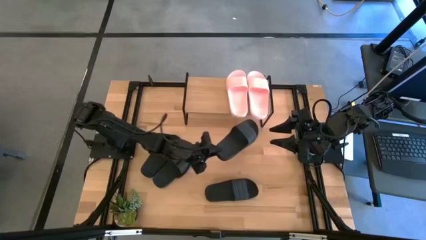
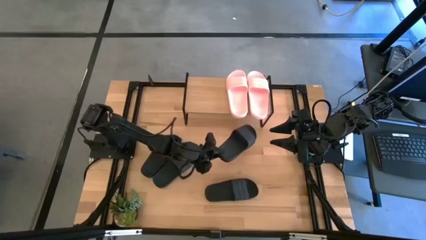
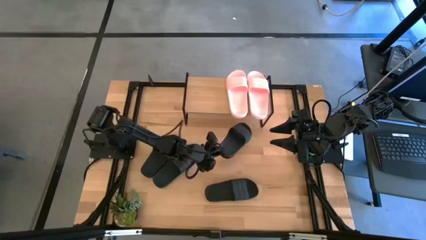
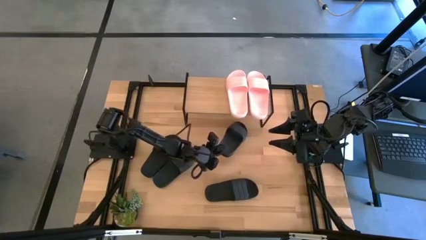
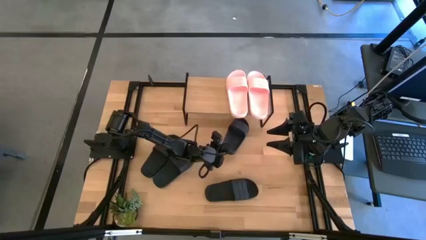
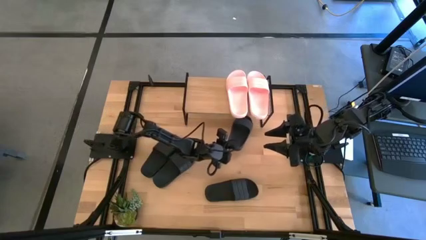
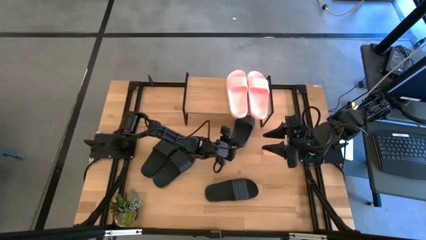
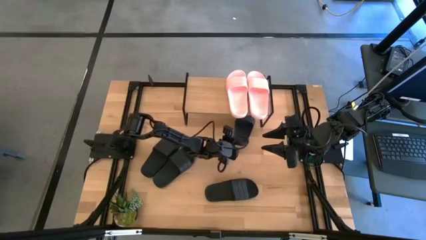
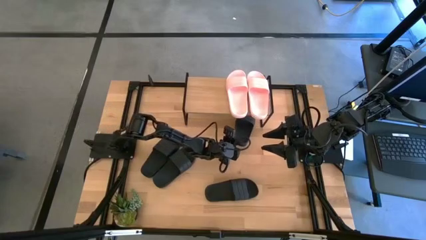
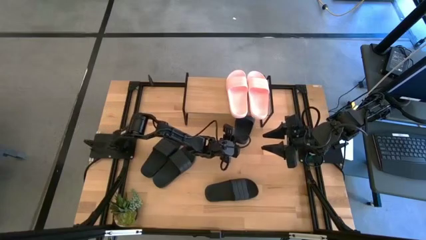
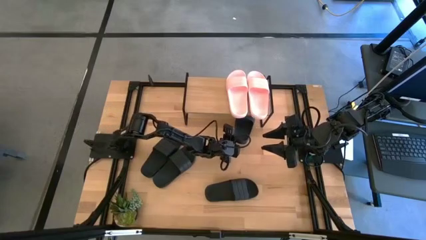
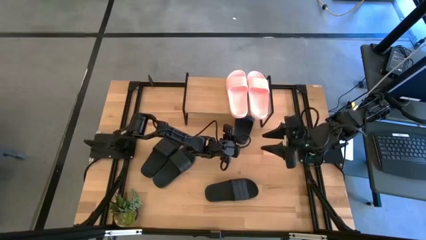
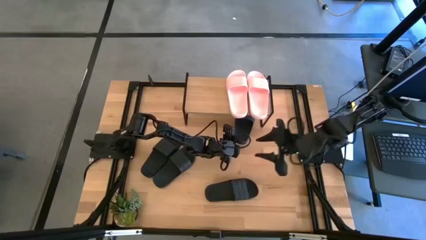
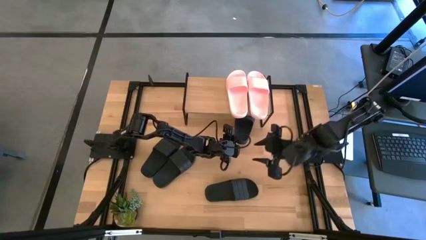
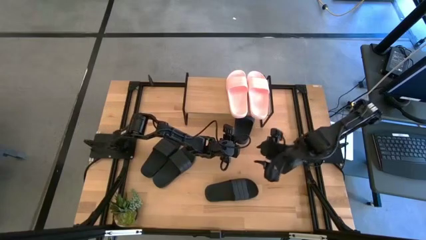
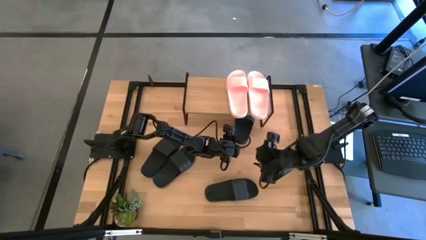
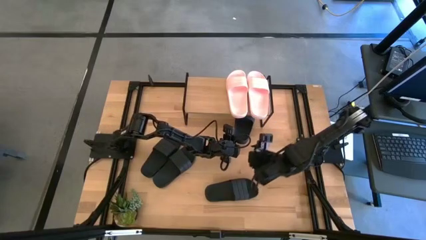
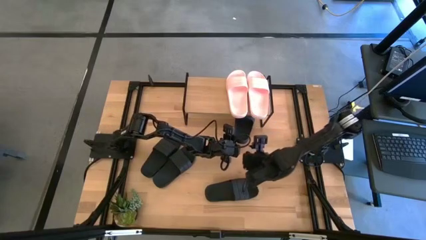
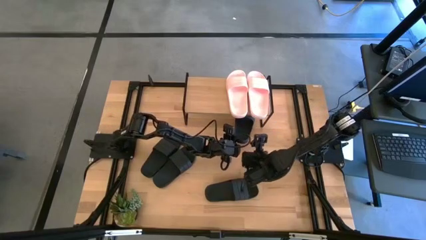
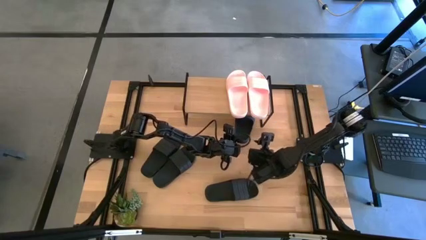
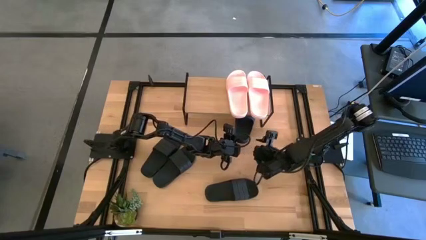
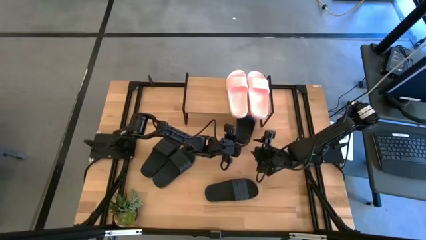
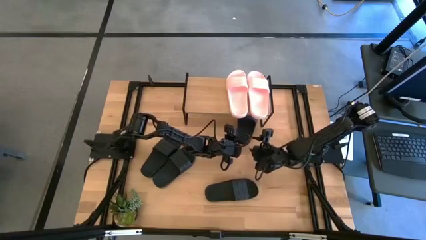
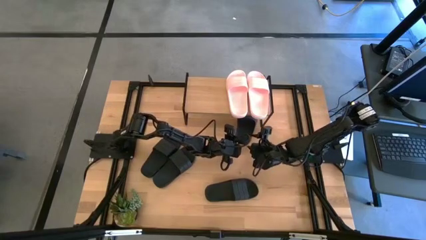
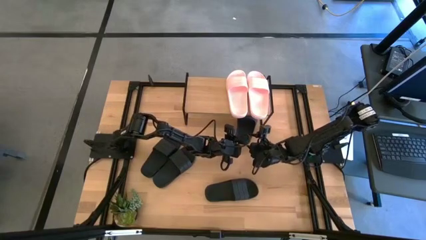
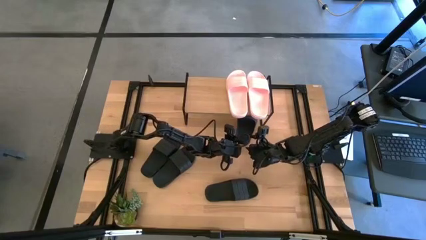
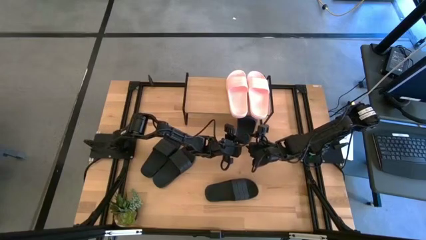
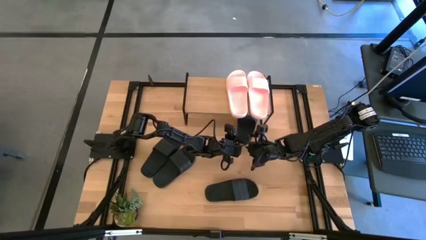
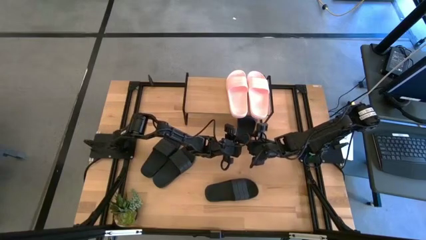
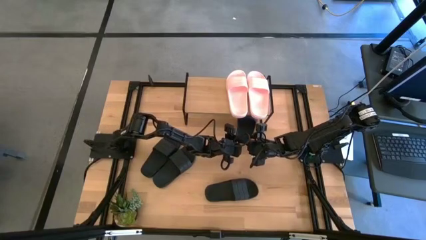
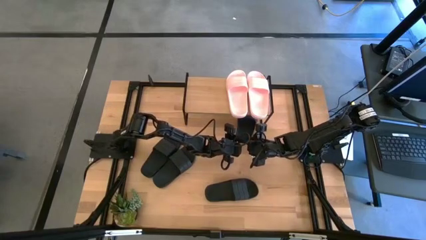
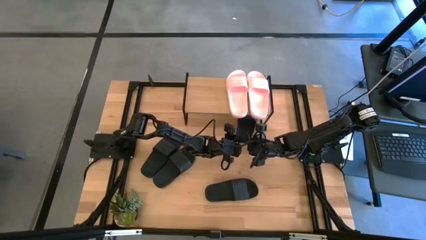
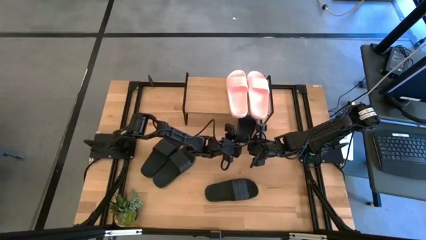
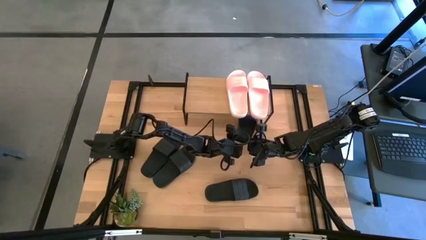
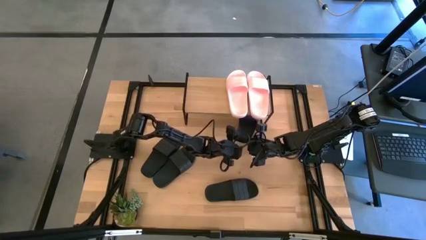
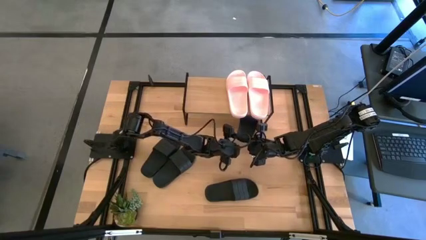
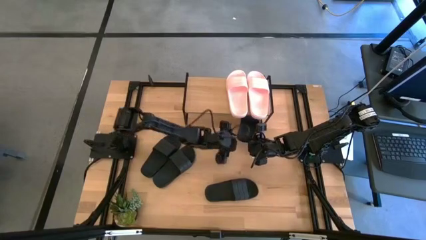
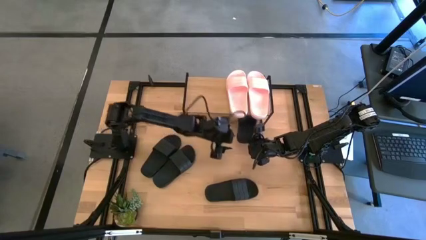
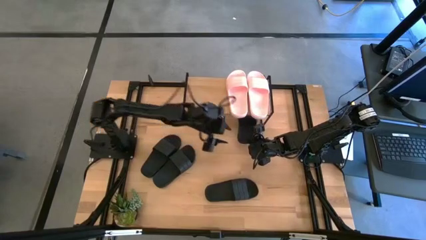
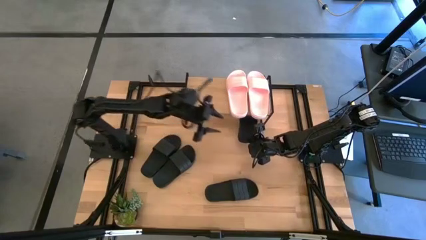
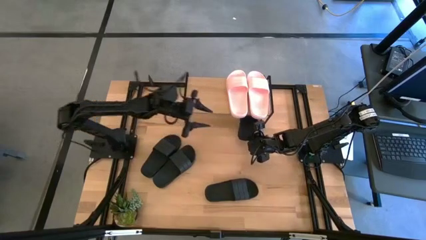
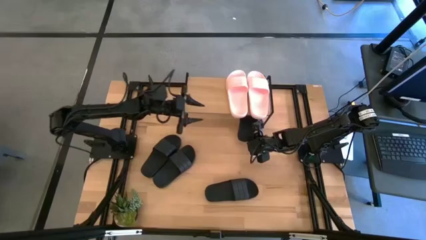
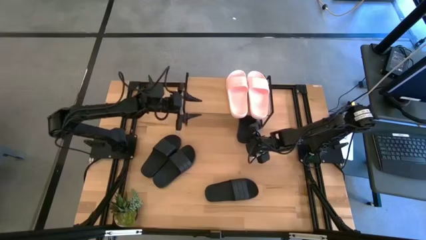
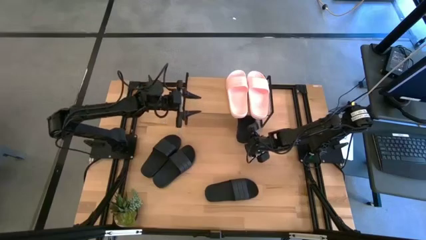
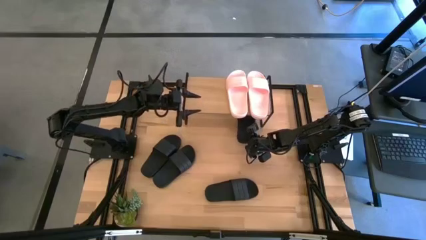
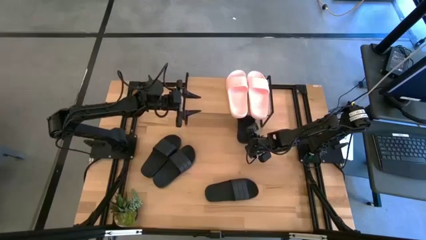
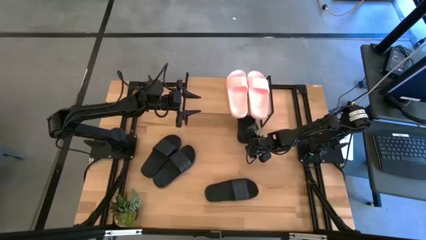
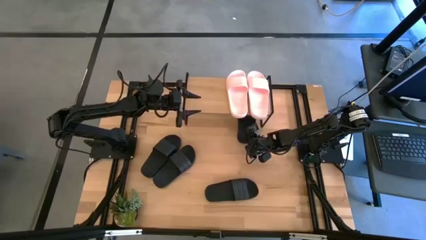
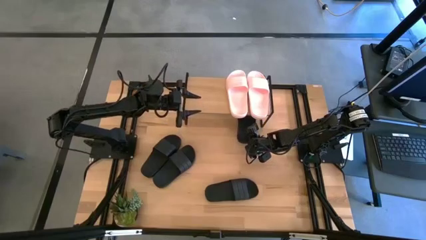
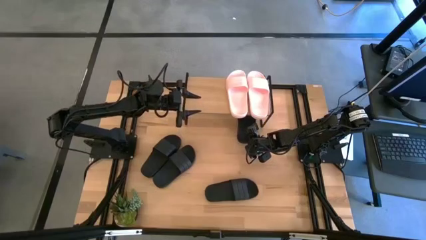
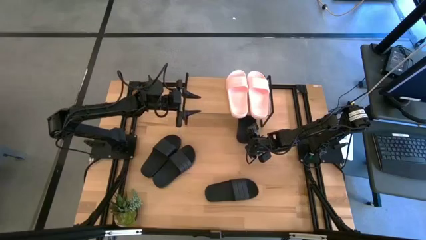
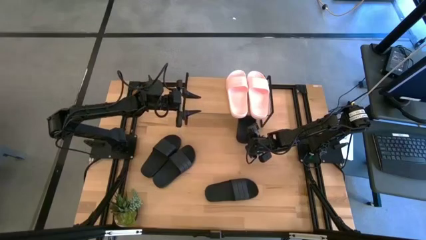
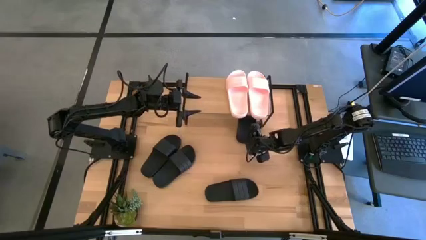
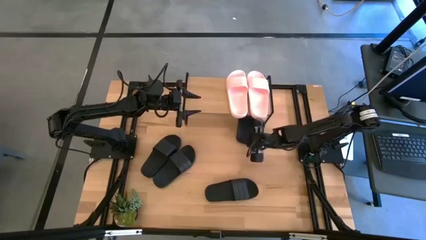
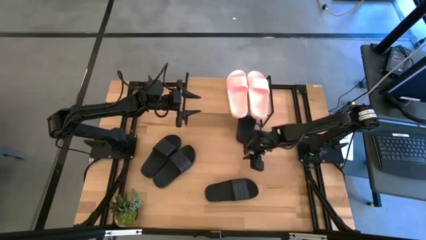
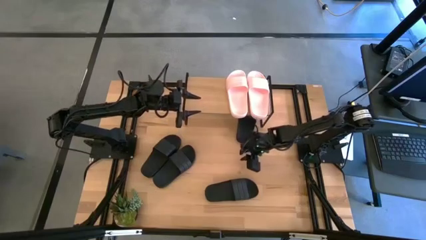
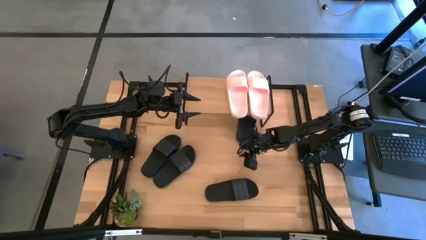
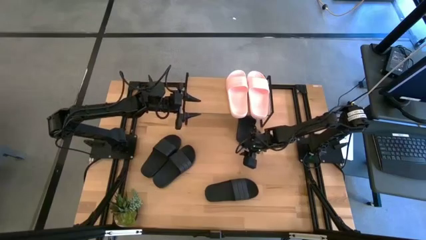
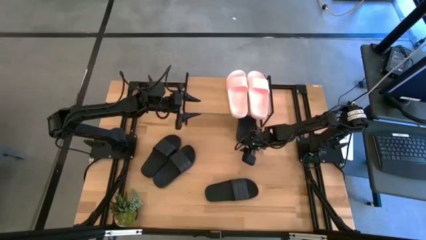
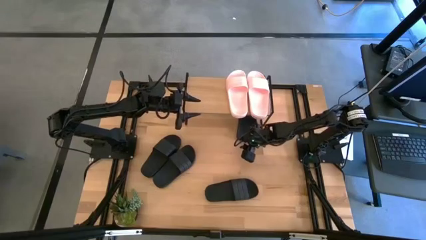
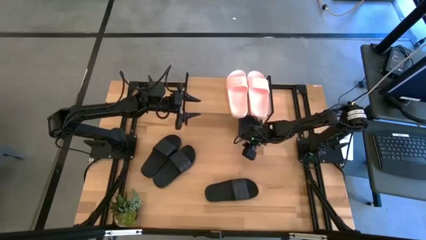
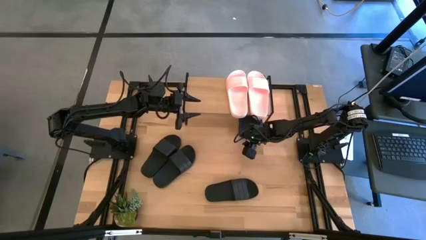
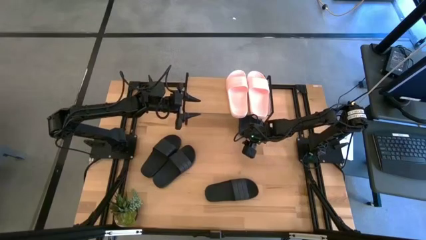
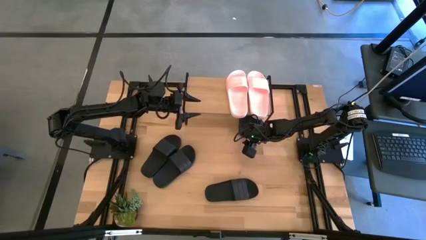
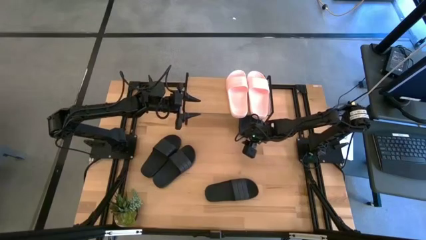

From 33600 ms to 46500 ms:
Task: Pick and place slides into the shelf
Put the bottom black slide under the shelf
